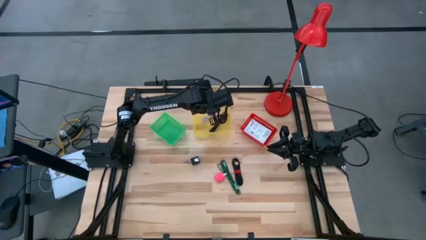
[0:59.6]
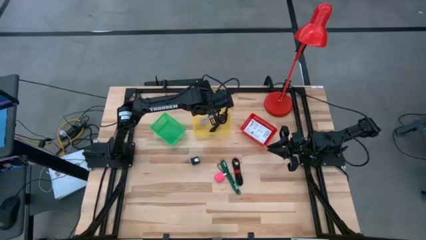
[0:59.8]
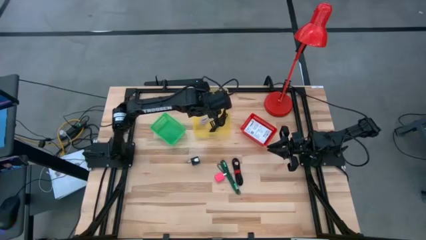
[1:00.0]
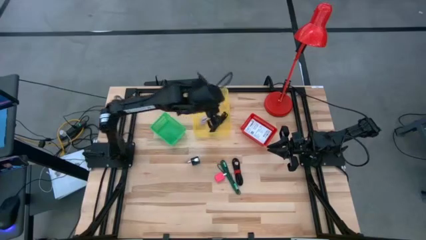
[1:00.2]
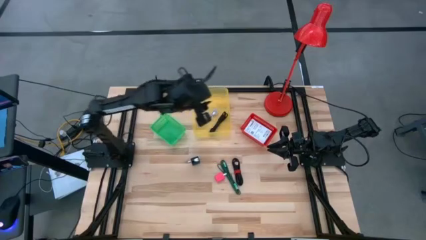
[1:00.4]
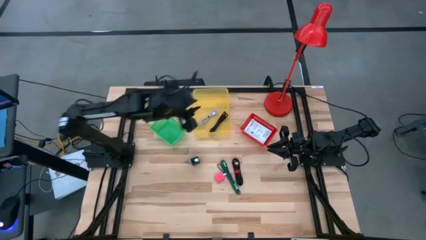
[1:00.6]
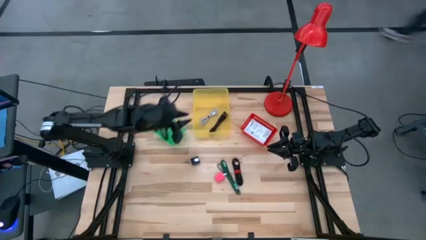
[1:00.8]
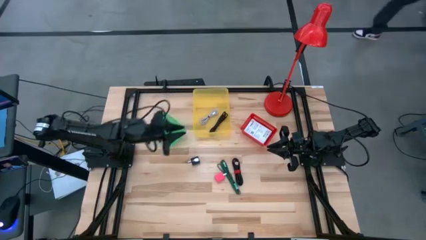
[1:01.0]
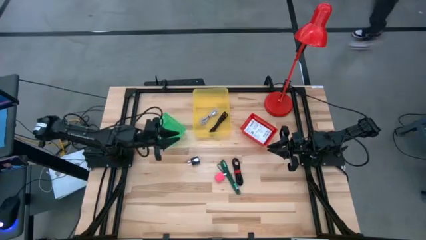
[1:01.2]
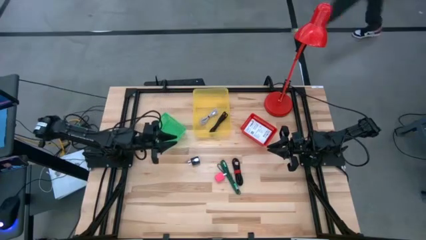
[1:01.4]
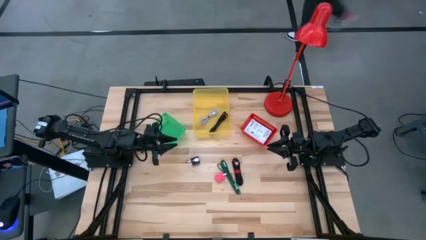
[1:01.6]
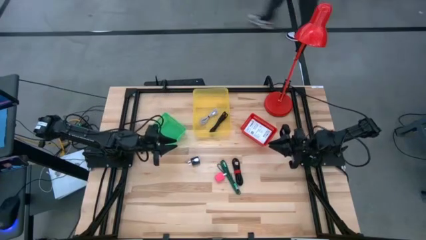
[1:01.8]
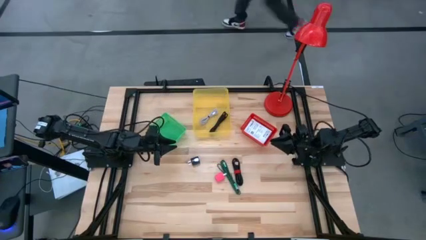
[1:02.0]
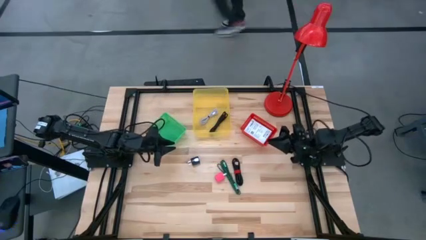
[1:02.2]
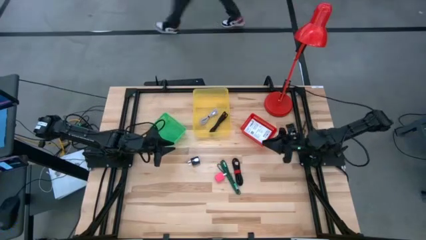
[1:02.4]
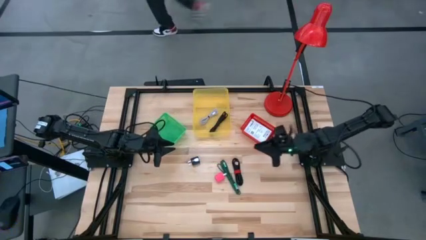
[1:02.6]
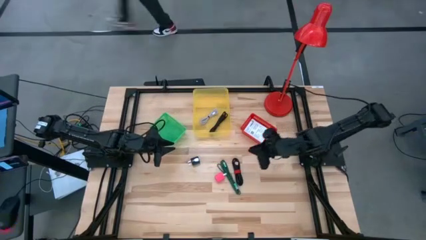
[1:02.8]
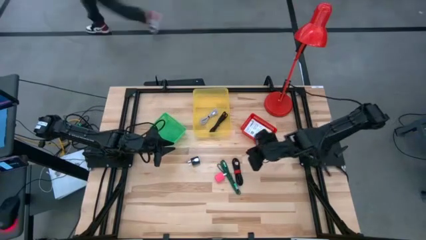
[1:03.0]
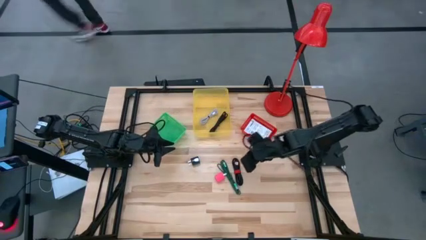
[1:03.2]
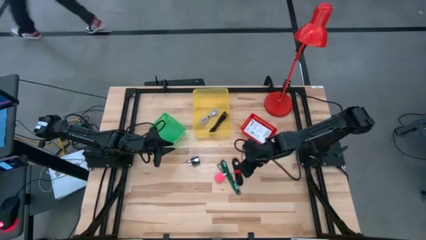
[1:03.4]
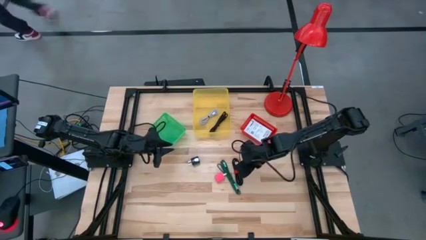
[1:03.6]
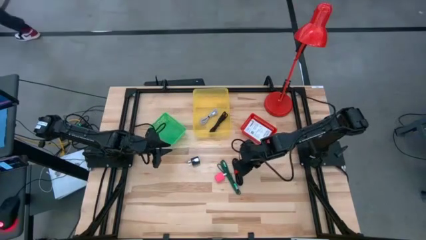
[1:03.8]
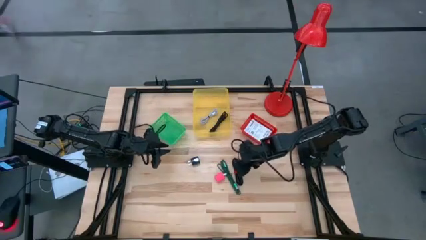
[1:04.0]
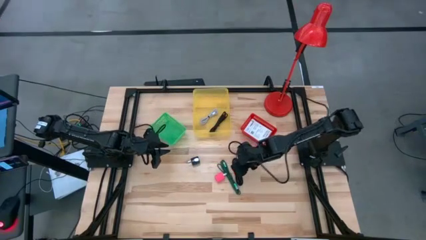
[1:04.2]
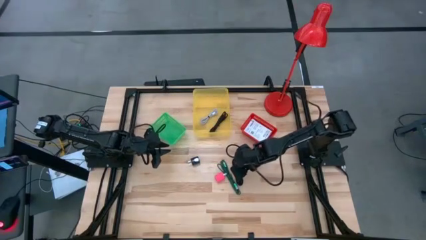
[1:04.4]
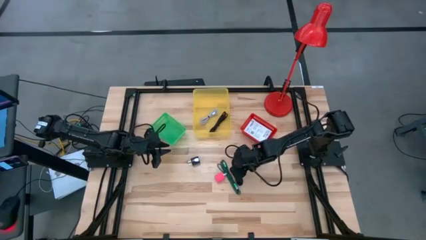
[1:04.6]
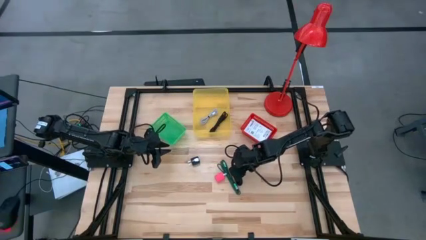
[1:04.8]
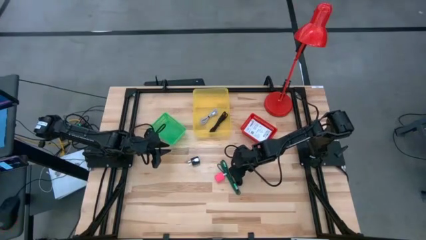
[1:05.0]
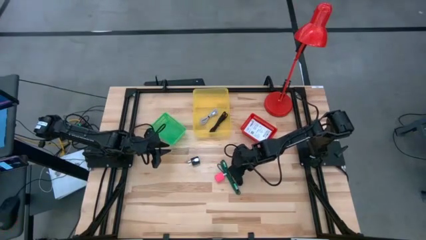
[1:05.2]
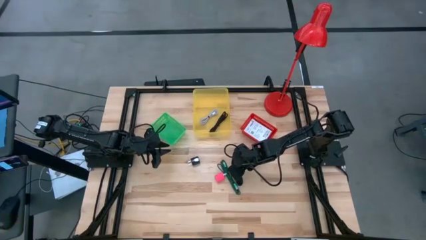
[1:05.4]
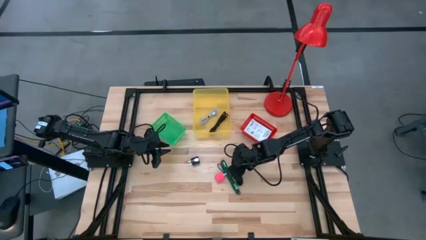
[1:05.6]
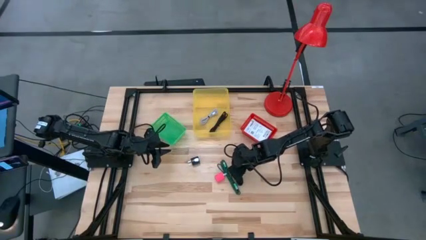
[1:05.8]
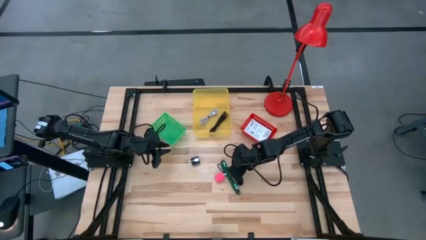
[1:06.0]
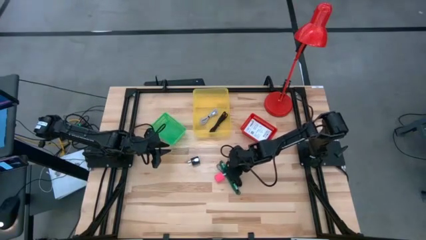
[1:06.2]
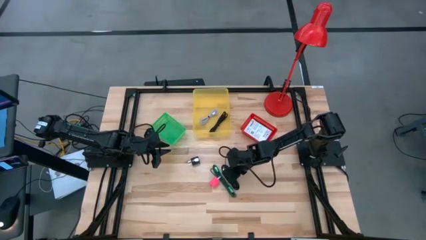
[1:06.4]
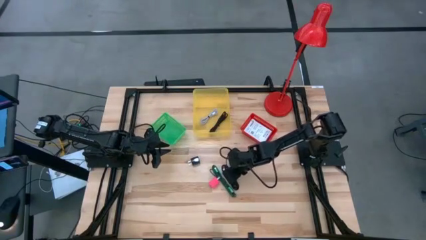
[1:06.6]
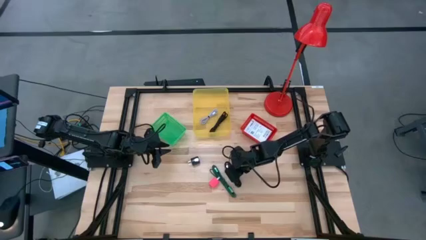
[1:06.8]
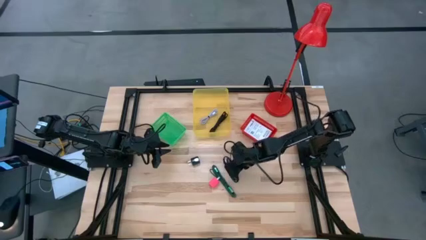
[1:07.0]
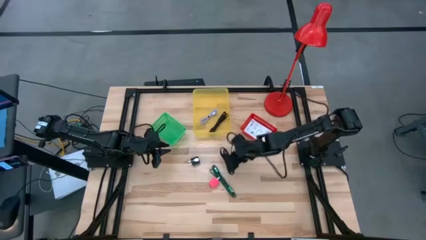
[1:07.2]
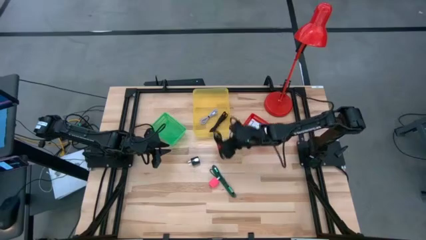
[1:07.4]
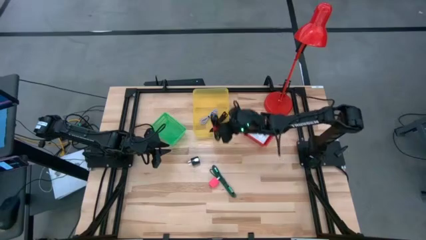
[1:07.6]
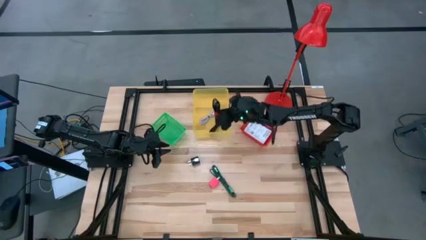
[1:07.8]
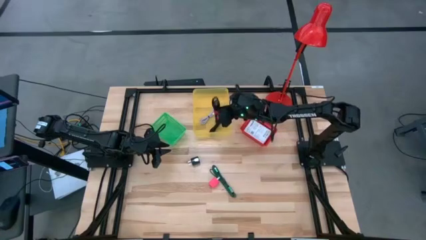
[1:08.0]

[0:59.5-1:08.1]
Task: Pick and place items into bin
Put the black charger cable into the yellow bin

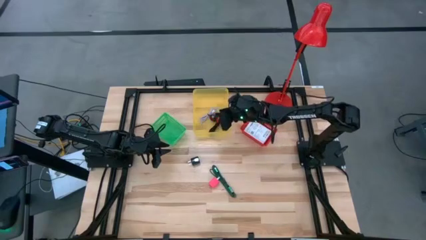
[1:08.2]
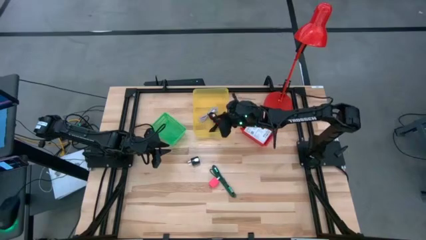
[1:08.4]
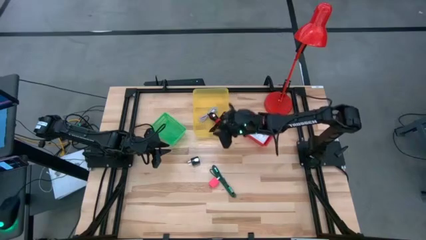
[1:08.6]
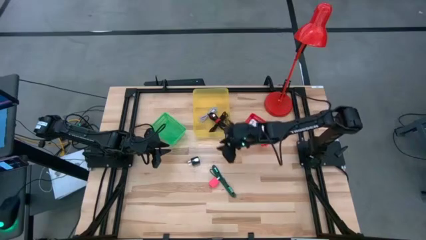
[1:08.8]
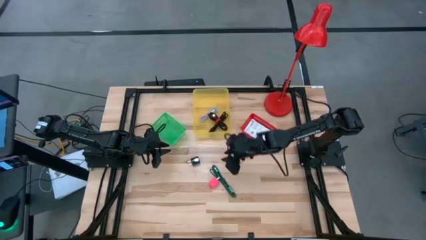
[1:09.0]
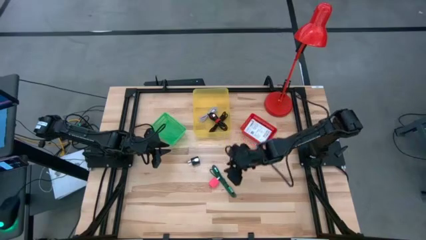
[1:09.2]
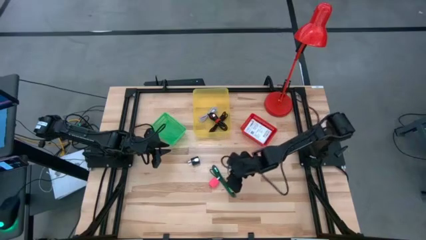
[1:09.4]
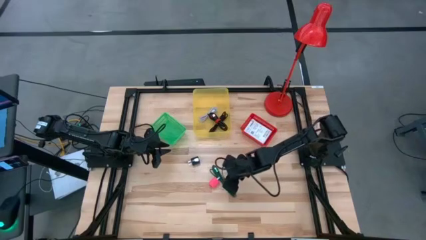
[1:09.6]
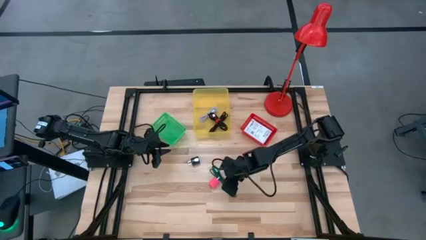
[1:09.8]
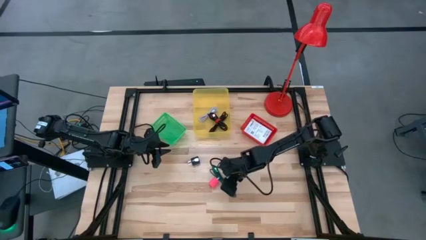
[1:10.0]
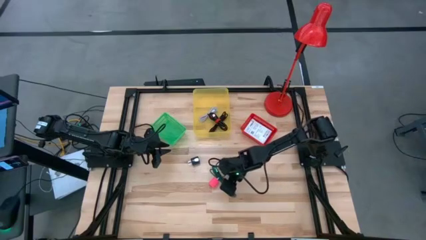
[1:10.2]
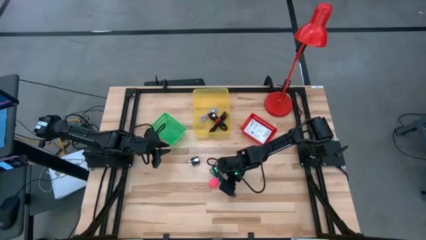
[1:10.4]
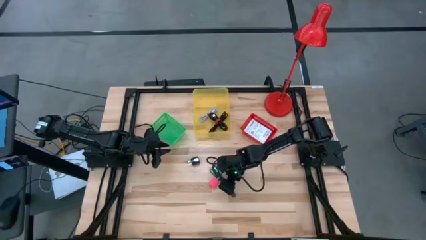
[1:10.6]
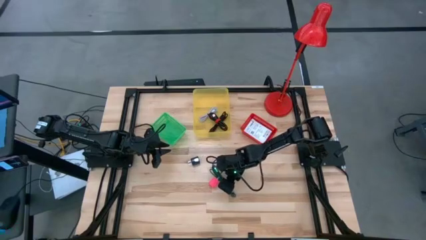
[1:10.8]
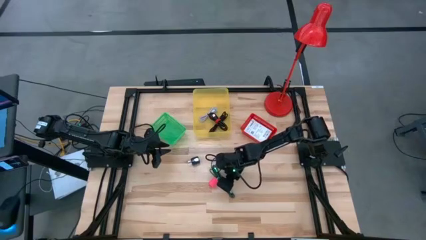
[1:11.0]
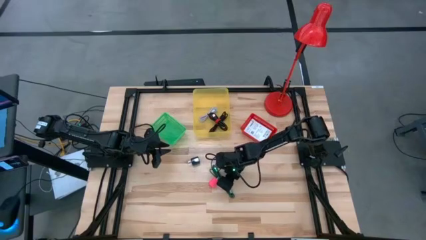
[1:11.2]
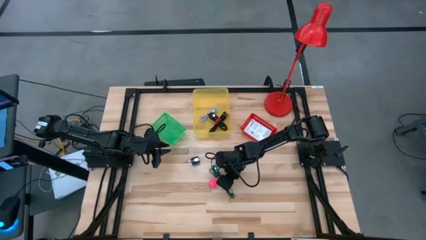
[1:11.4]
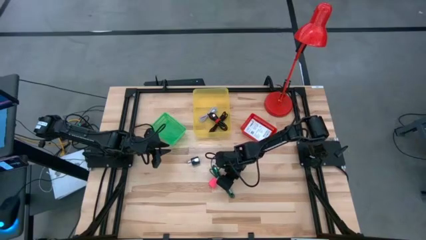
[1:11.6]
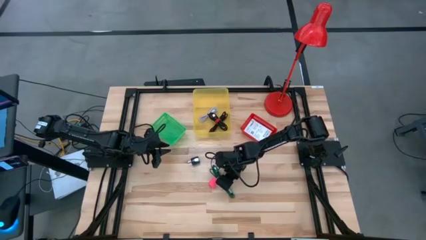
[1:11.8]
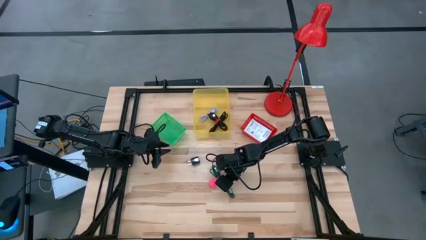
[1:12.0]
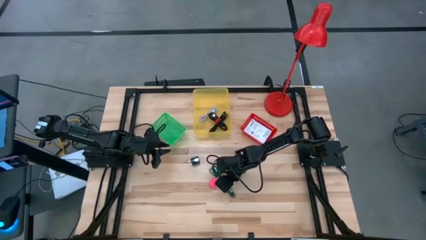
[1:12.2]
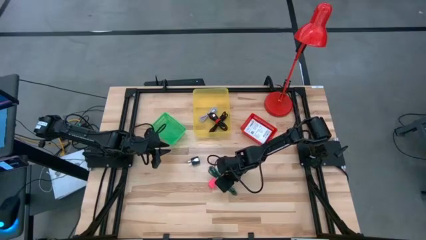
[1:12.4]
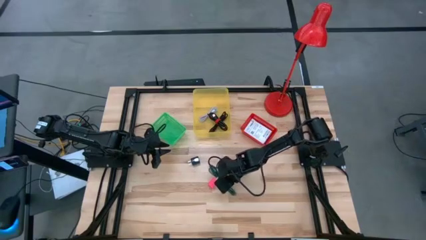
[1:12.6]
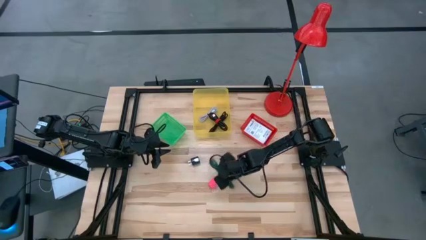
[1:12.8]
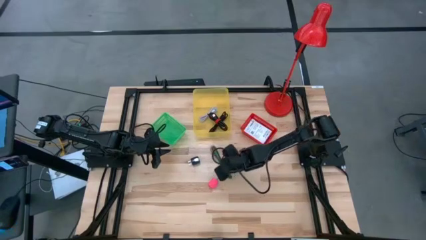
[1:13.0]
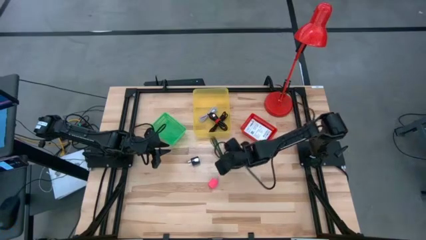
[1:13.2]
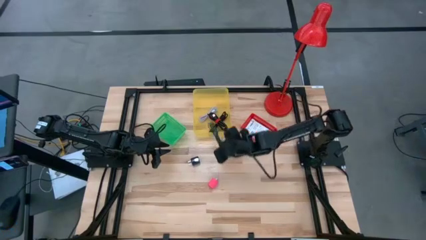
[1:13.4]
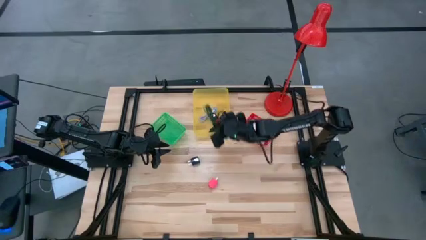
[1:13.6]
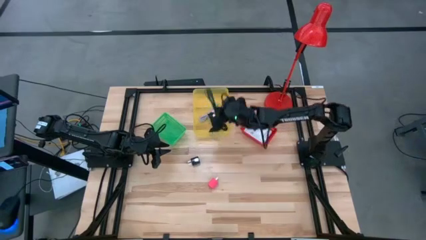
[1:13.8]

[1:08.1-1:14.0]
Put the green charger cable into the yellow bin

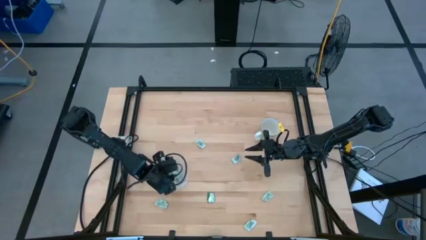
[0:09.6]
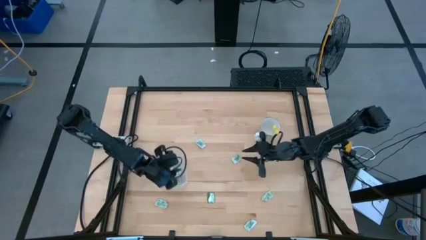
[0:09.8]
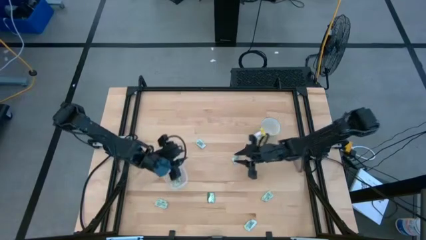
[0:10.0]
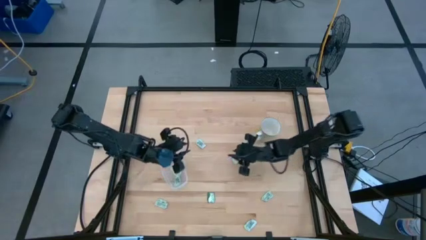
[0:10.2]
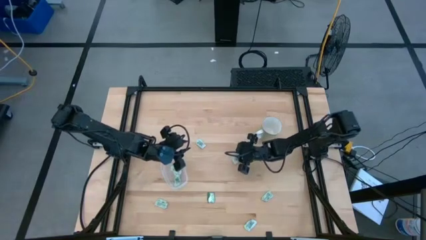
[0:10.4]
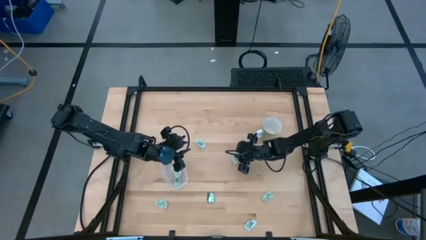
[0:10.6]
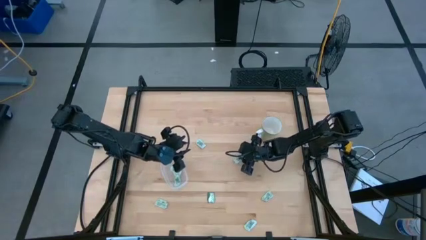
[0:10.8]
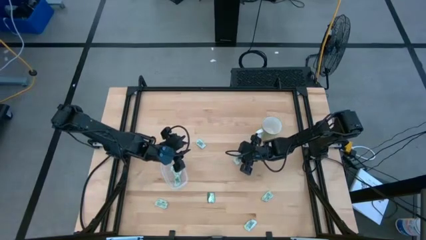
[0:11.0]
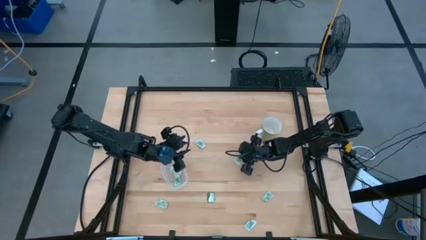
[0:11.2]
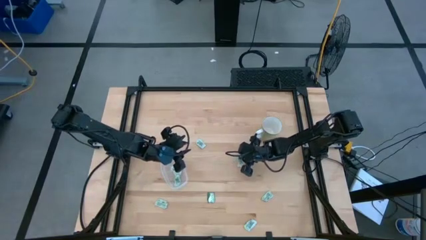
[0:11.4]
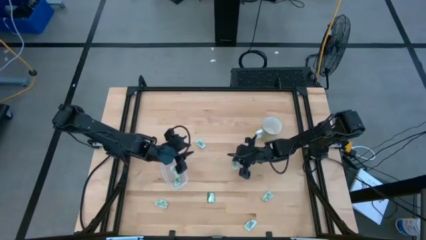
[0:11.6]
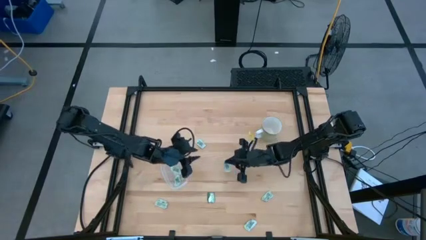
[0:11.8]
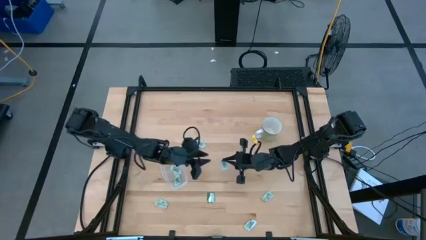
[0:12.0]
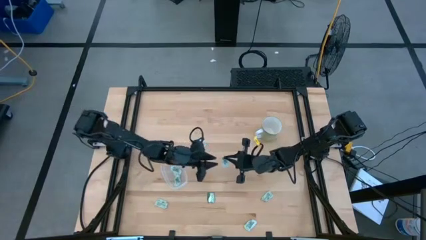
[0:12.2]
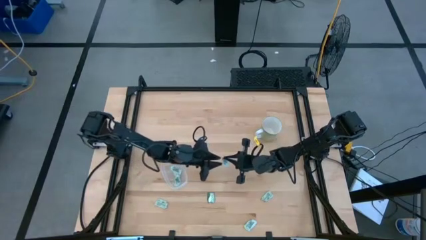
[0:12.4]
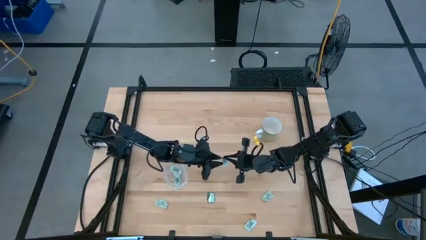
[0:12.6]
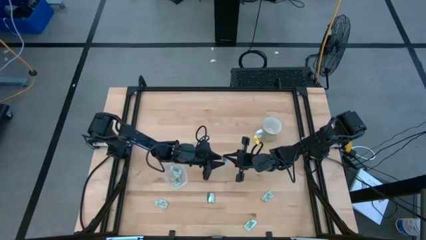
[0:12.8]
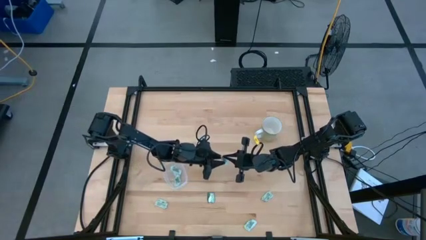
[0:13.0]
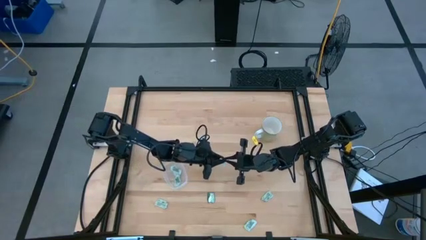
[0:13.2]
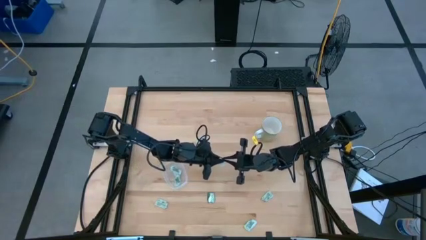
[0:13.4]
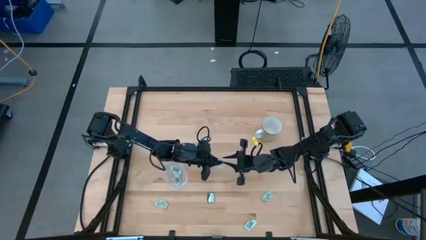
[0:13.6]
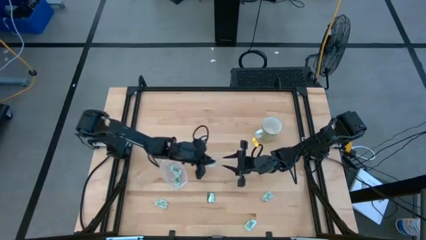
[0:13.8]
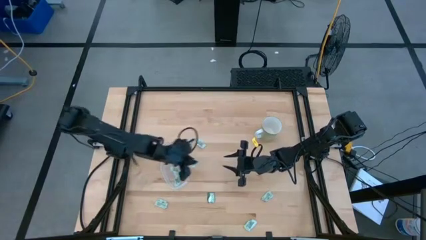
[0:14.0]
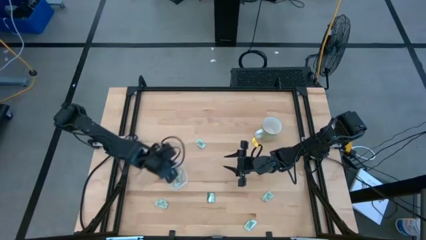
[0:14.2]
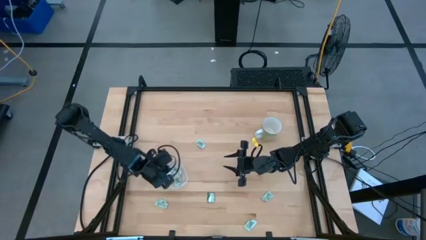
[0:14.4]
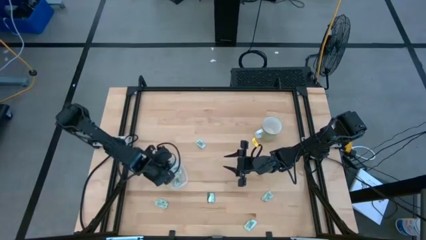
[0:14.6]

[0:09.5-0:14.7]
Task: Pick and place Stevia / Truvia into bins
Put the green stevia packet into the transparent bin
